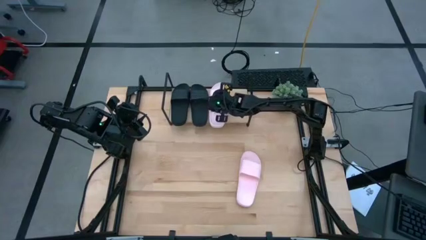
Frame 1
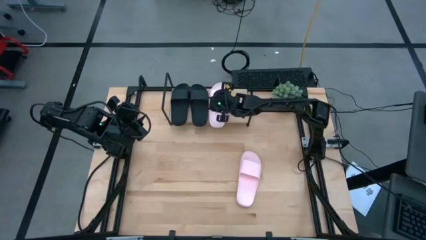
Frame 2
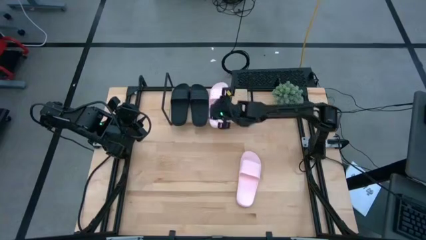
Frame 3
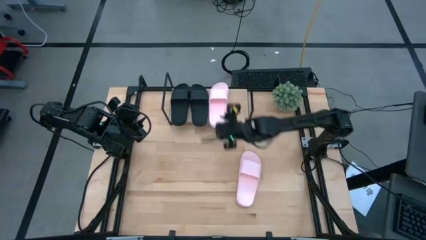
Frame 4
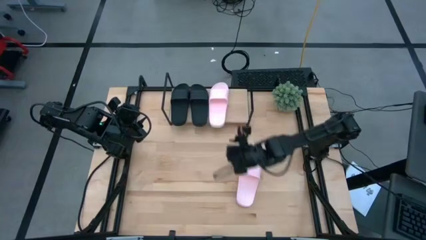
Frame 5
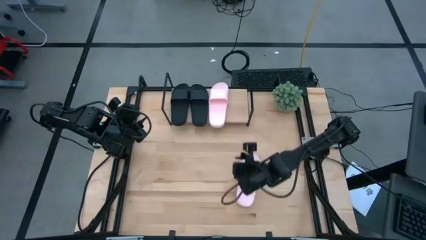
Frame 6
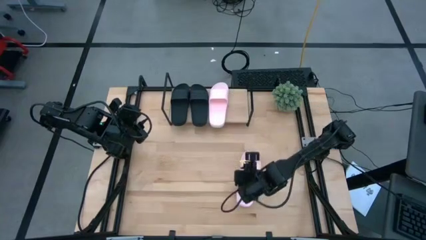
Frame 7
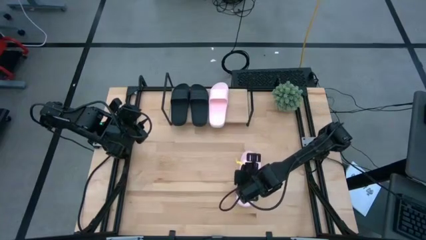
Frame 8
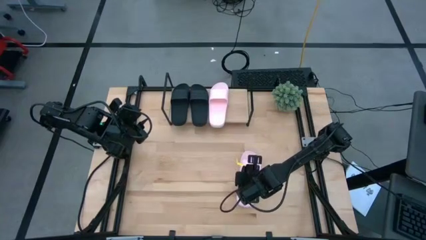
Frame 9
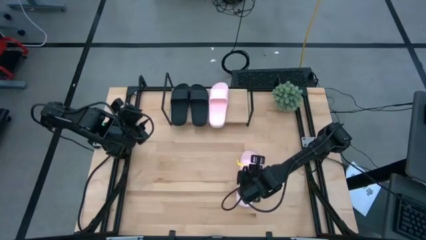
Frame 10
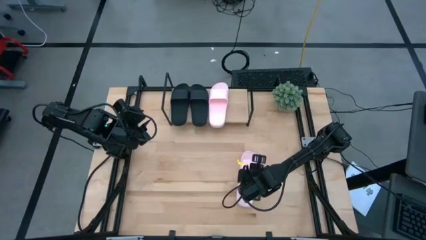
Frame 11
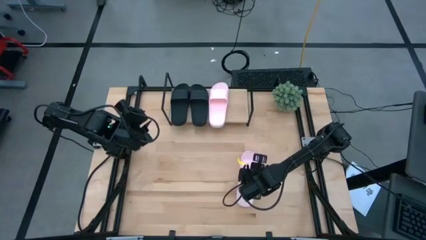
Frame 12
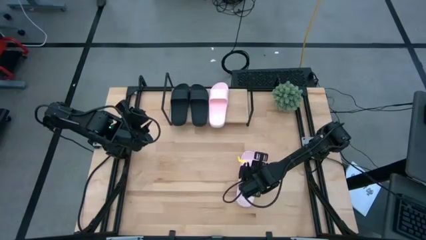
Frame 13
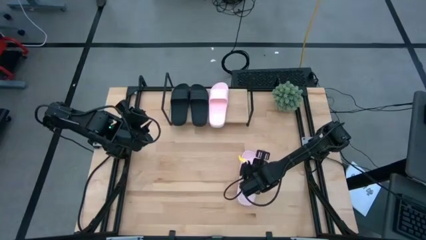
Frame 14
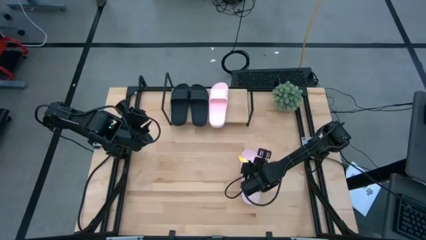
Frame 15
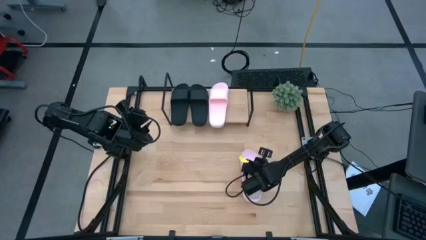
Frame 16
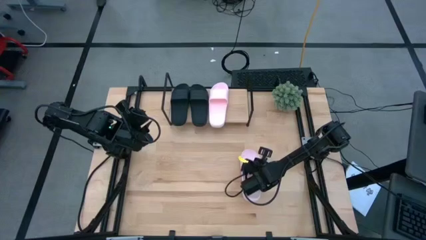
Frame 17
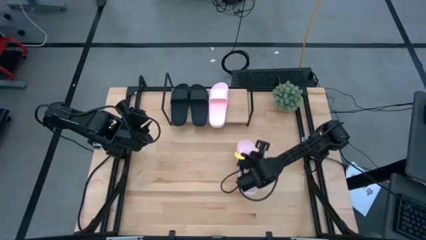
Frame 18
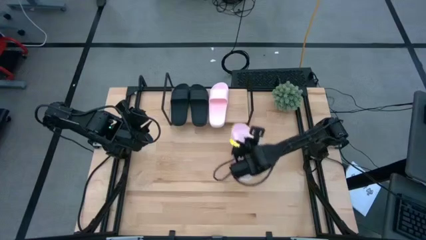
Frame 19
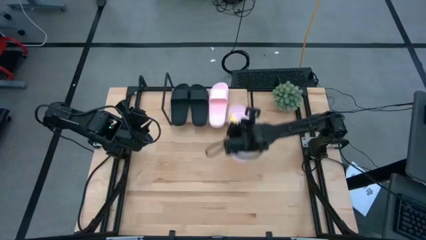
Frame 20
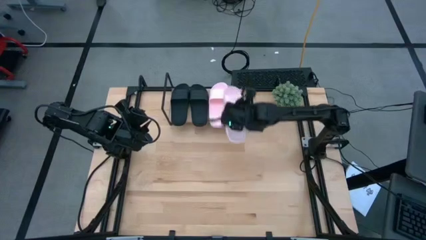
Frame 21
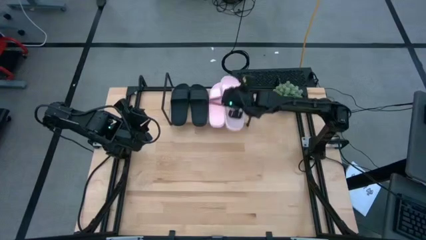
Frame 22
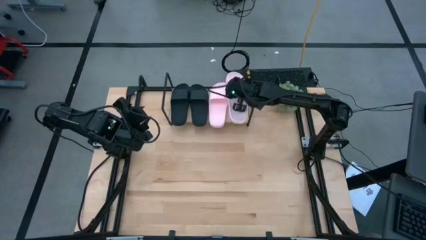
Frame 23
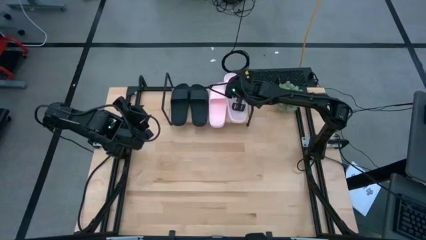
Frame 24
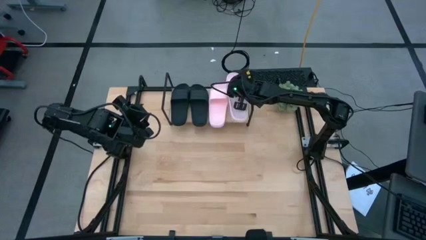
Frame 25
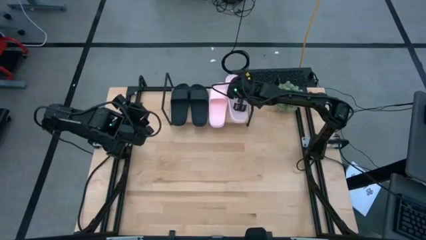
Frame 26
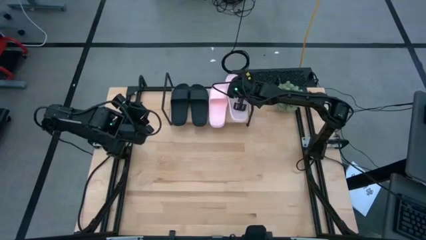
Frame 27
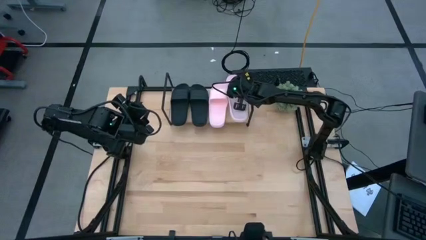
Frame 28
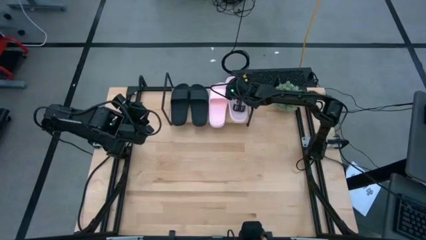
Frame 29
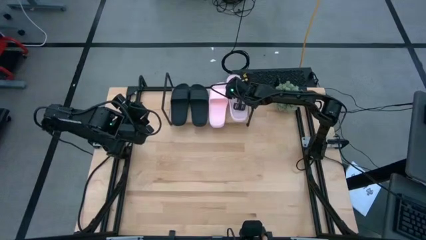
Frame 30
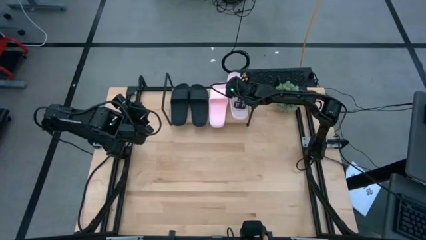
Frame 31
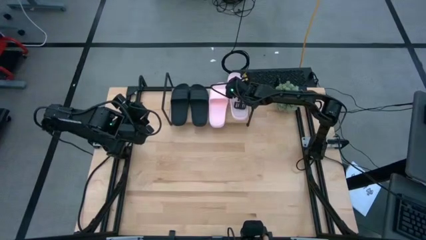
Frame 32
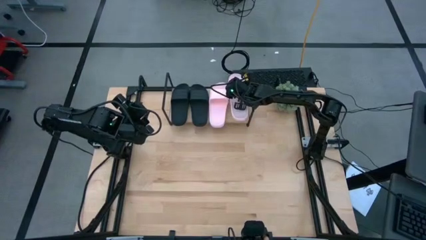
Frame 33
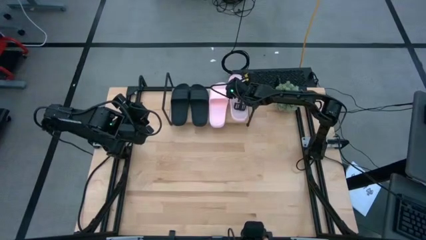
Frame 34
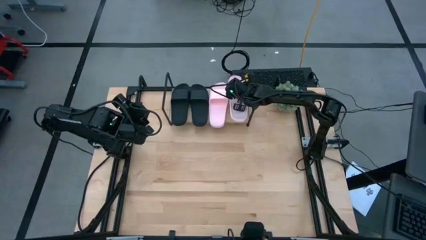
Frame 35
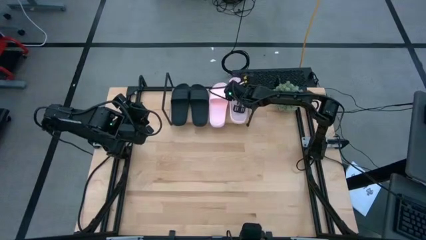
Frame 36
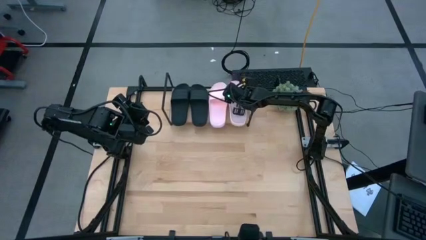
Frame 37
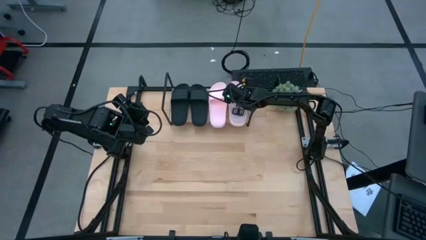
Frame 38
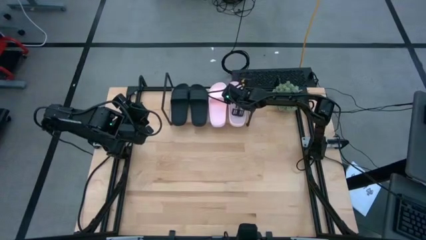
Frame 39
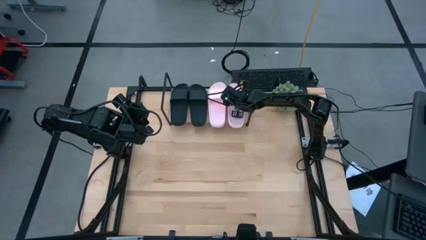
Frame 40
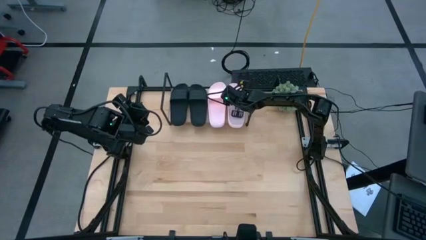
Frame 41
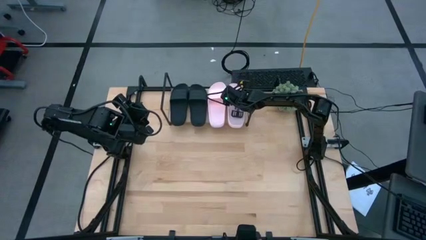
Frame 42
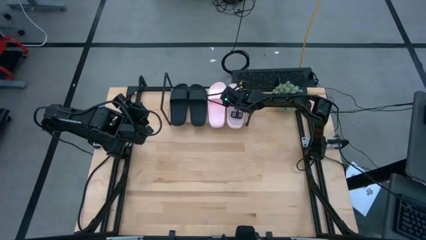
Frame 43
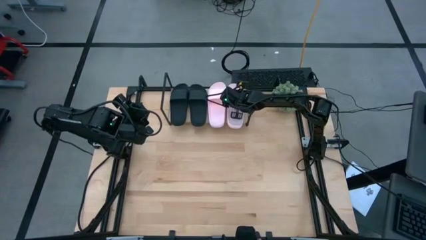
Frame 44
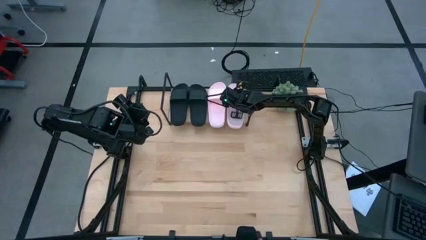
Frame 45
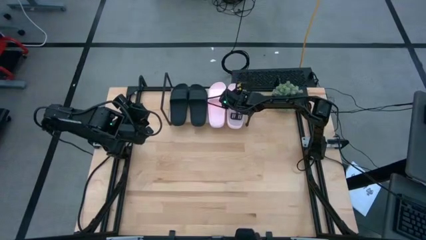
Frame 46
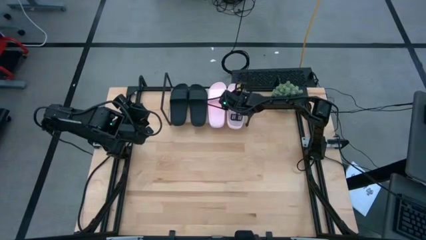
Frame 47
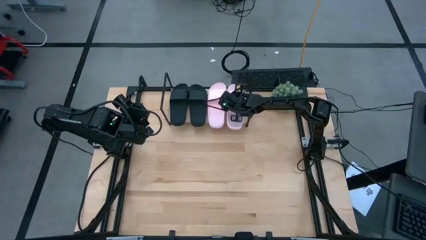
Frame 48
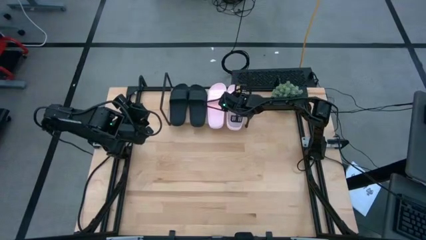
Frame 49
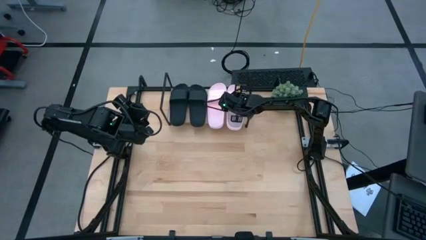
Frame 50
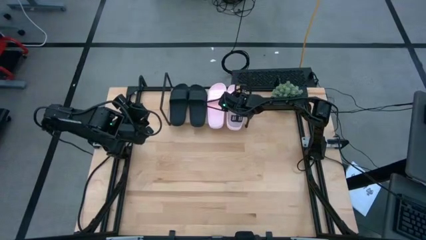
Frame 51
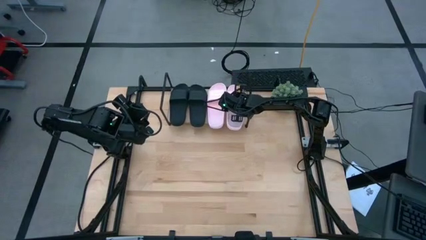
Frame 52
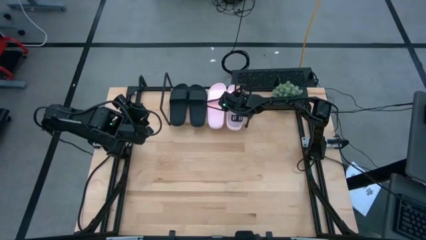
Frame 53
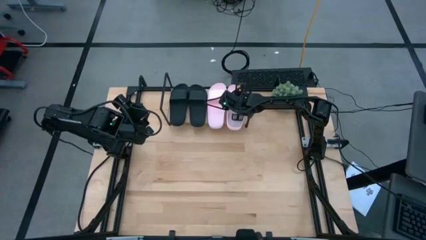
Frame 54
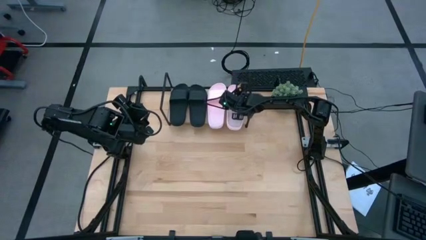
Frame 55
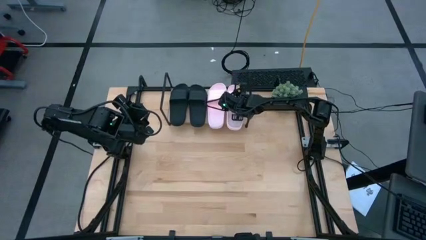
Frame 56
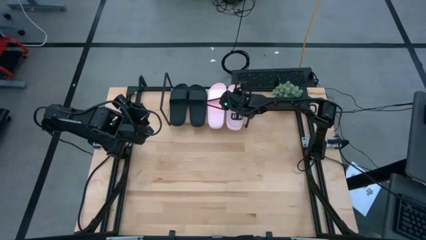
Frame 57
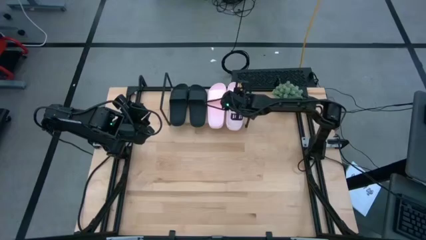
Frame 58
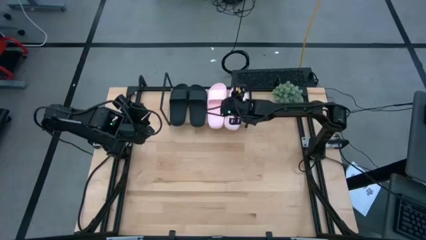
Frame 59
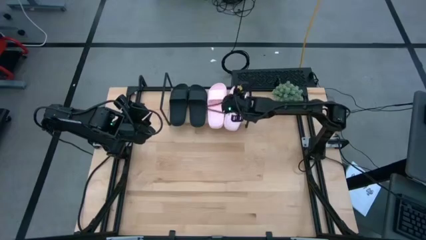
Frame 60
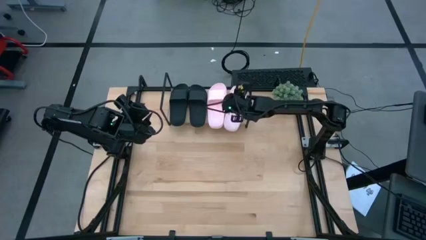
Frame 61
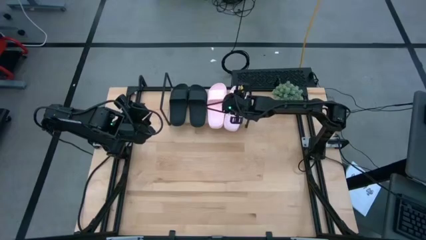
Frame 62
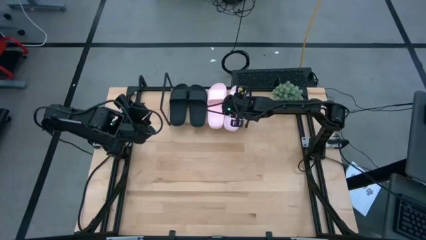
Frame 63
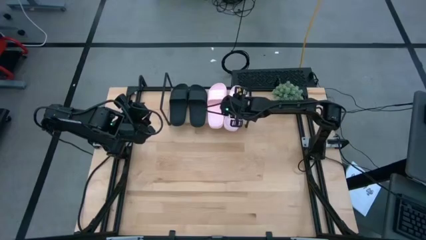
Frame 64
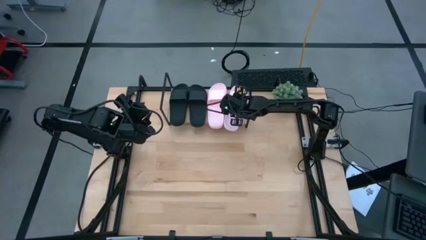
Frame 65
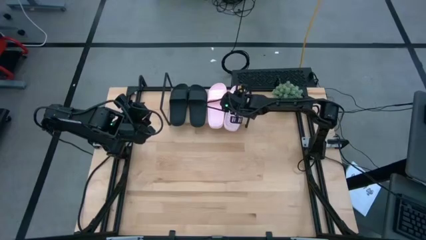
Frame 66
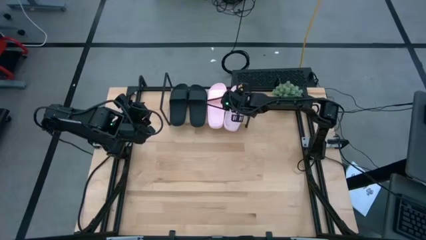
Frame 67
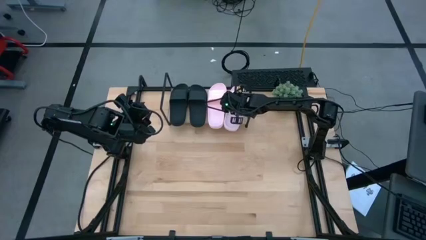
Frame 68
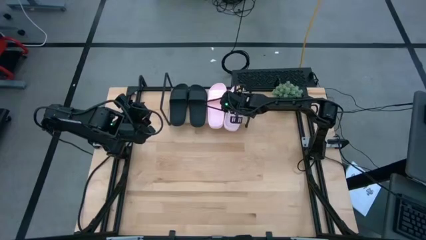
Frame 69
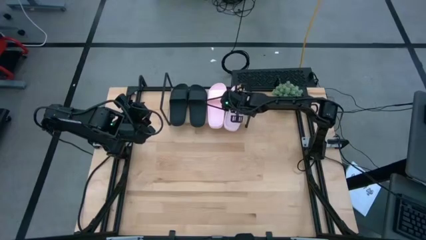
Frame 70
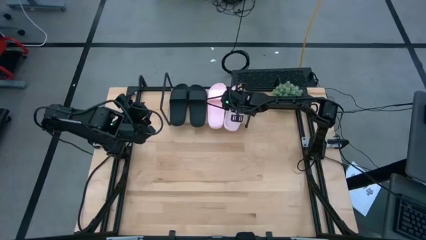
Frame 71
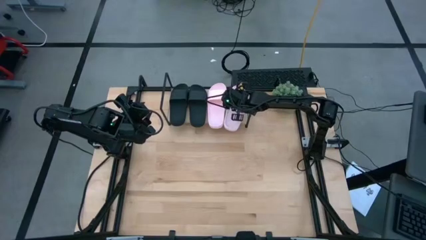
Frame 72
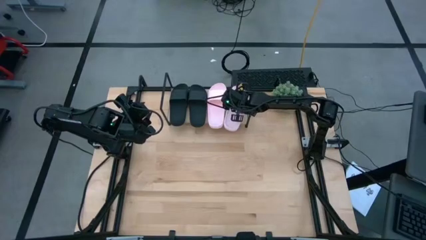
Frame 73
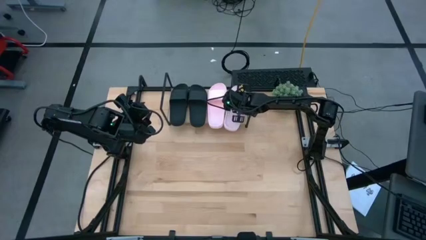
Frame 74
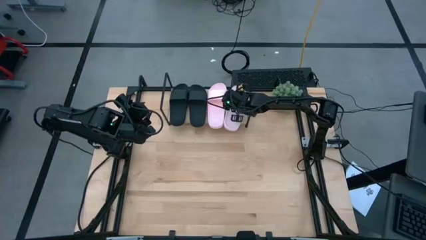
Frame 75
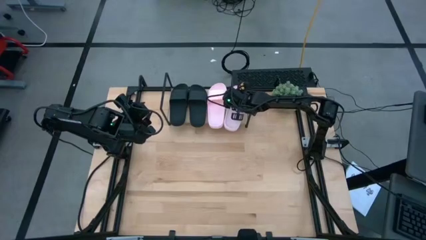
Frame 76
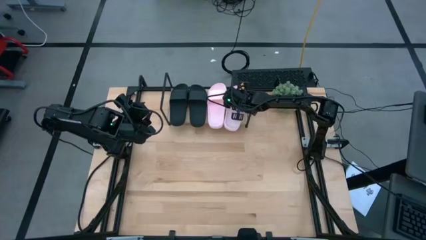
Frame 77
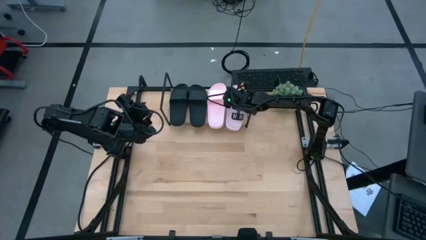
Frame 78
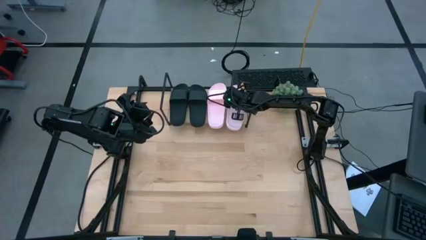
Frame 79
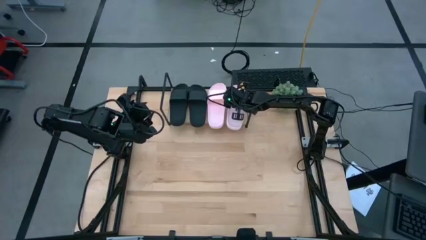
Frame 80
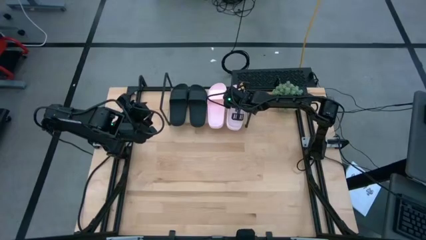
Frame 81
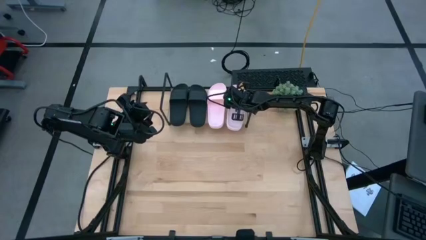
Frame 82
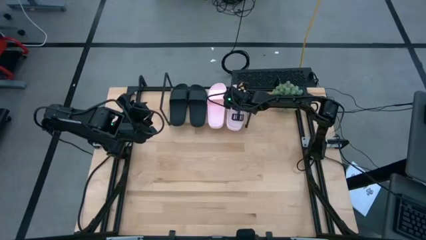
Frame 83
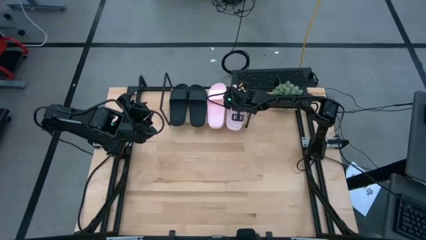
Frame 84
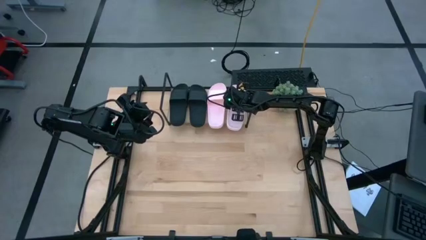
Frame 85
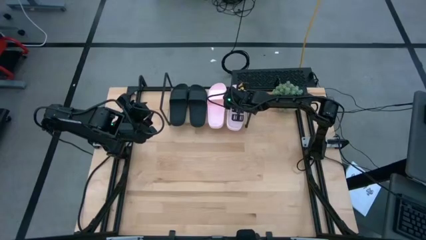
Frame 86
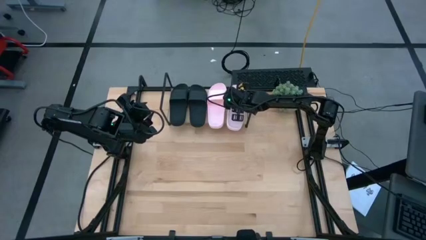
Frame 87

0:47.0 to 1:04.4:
Task: Pick and place slides into the shelf
Put the pink slipper on the shelf
